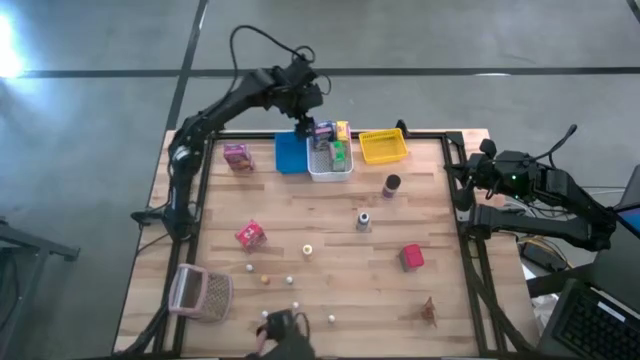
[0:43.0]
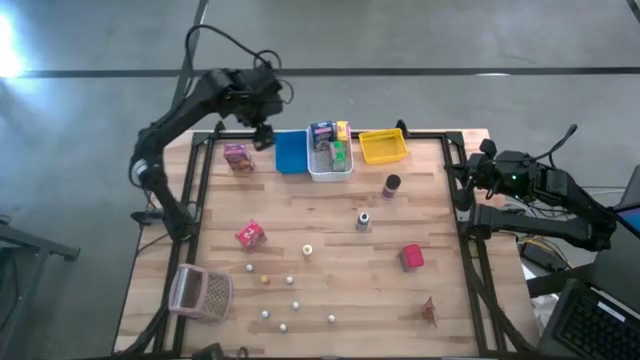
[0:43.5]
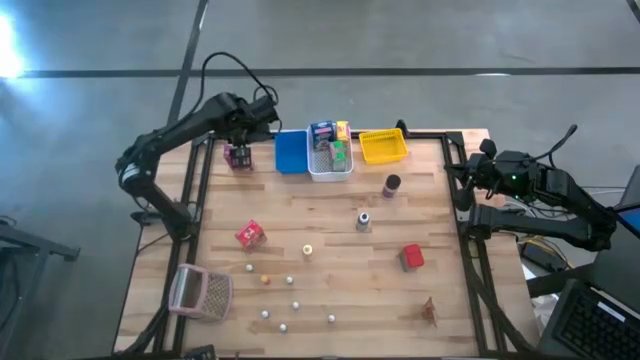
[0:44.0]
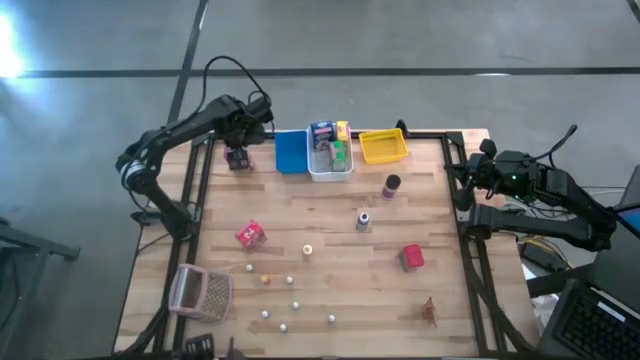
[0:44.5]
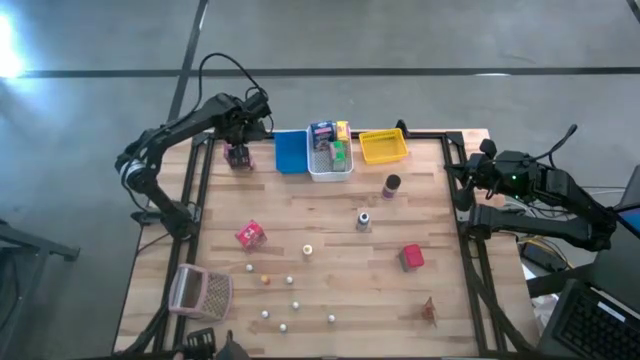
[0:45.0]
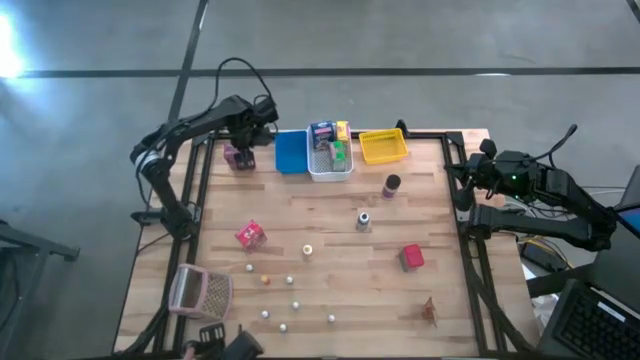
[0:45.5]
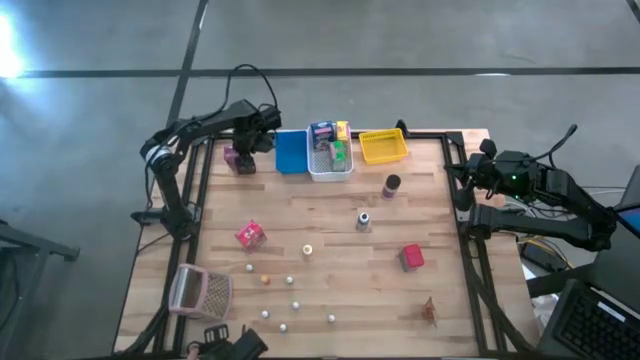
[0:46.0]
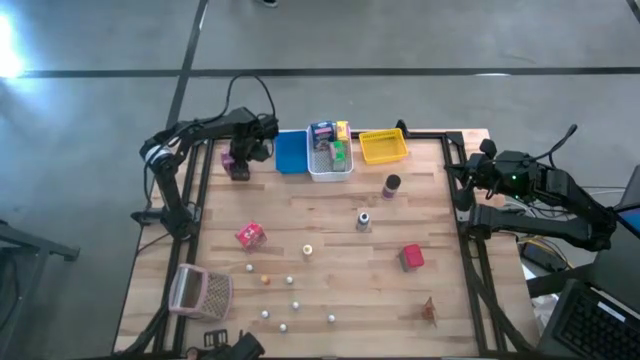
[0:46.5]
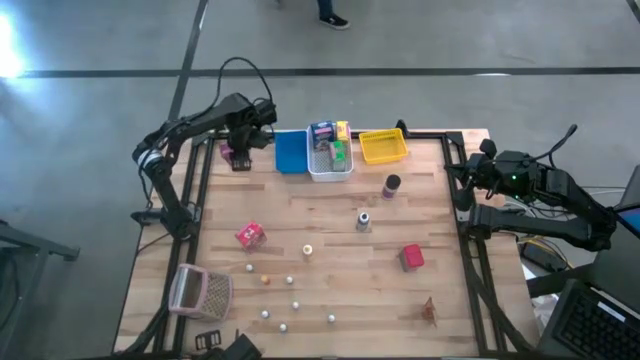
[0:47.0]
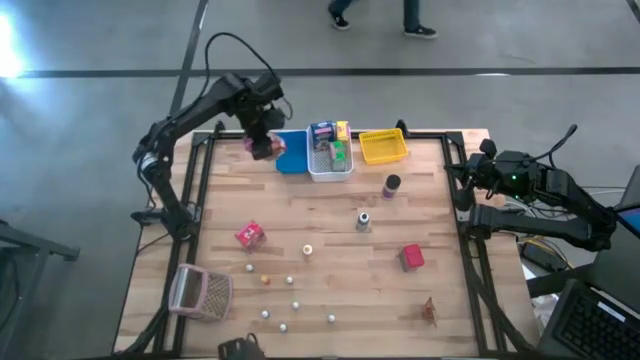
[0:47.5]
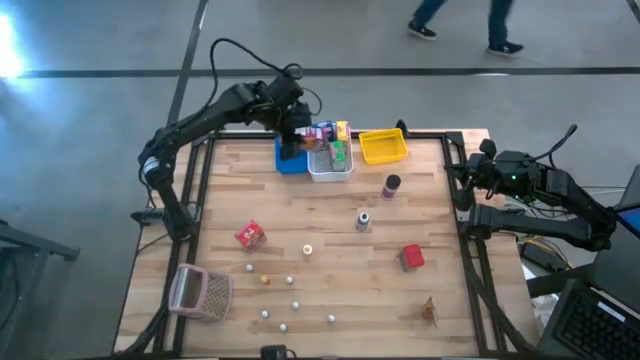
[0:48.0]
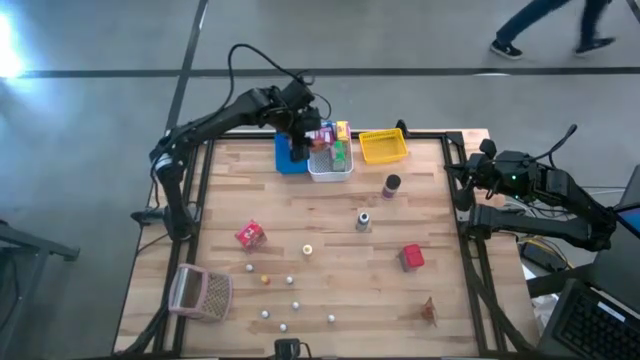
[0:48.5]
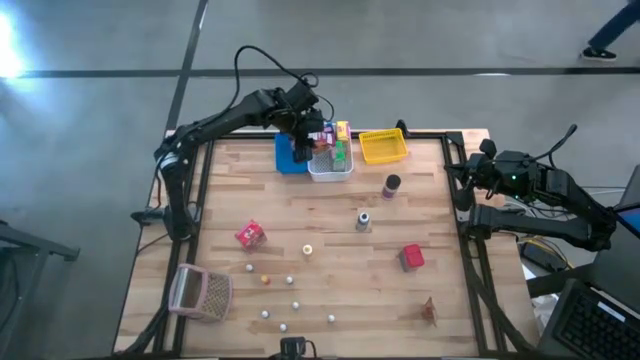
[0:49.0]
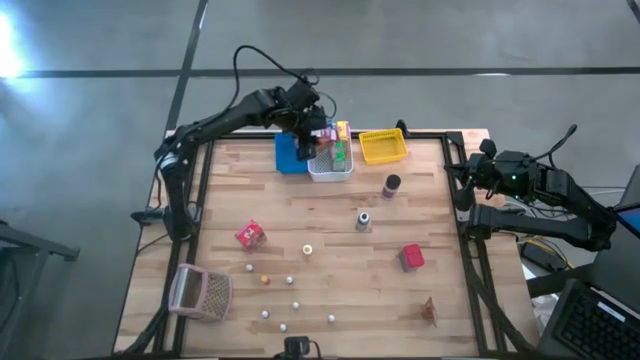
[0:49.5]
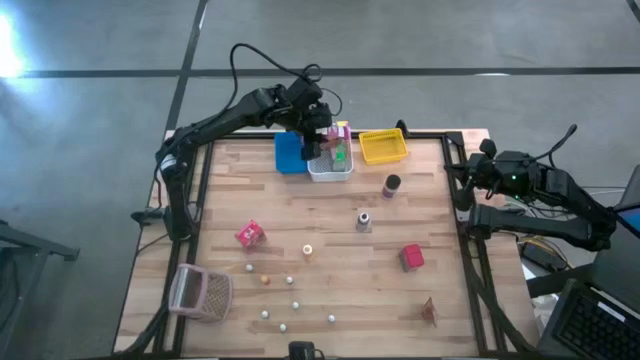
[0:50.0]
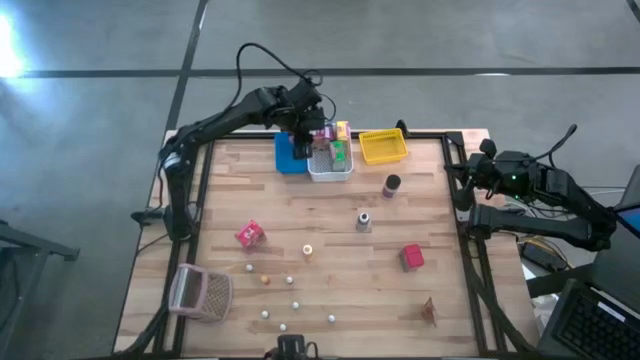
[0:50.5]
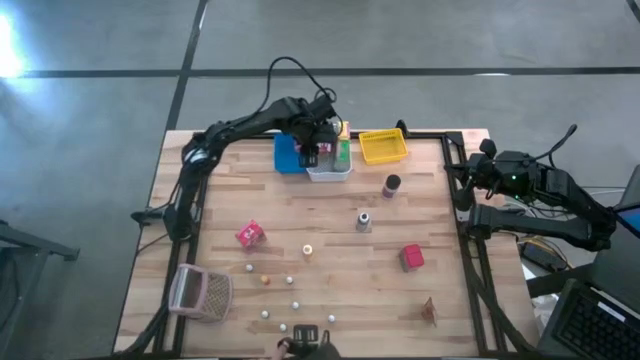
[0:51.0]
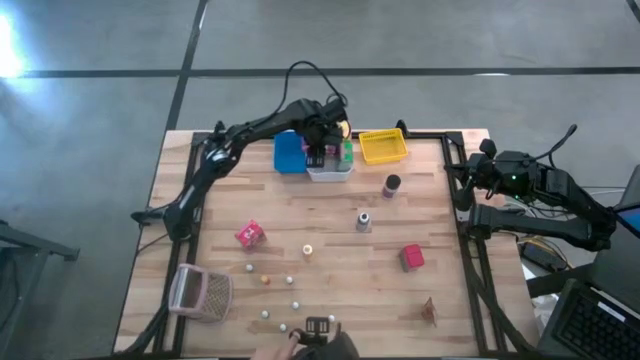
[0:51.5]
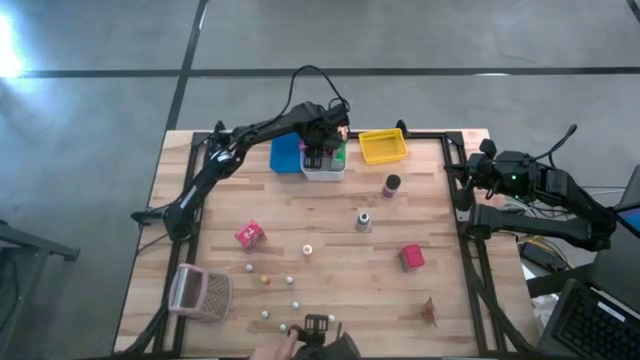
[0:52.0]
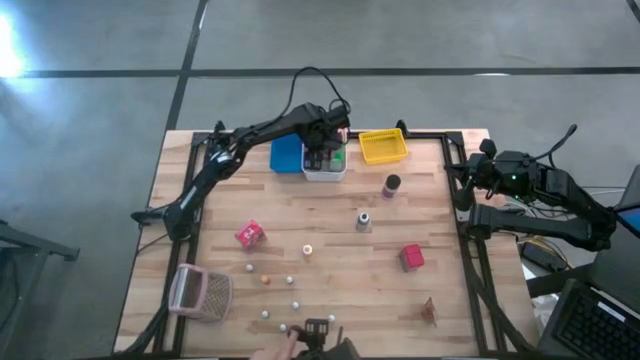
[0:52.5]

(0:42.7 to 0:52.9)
Task: Pick & Place Kitchen Items
Put the violet cereal box into the white bin

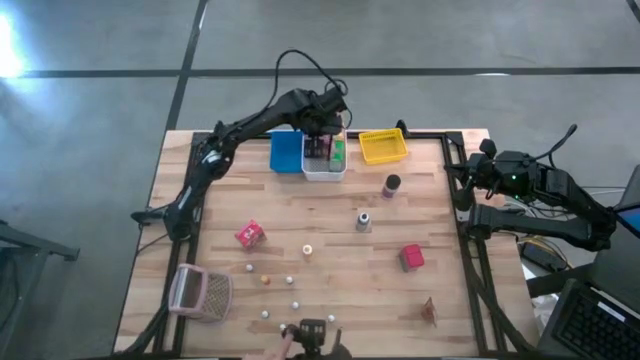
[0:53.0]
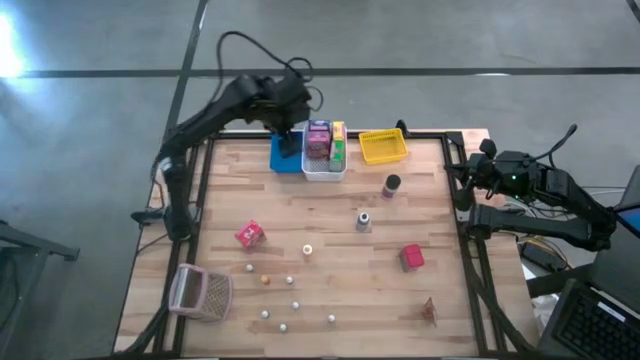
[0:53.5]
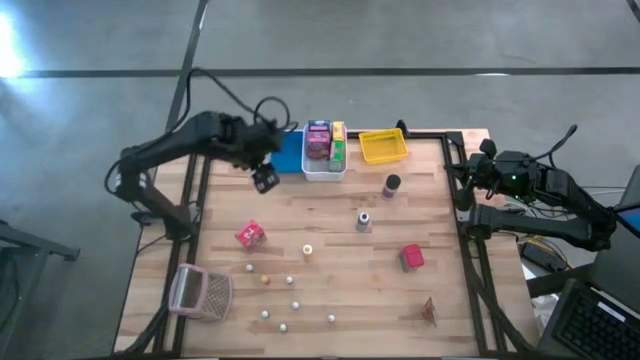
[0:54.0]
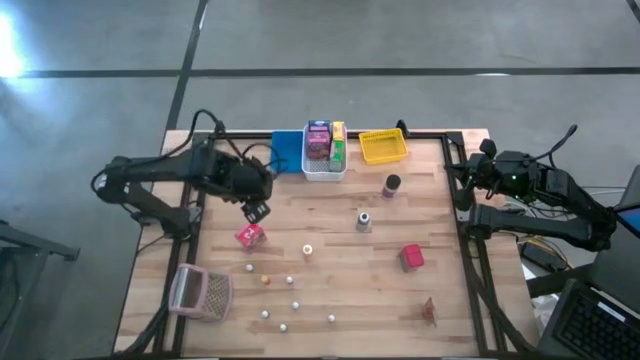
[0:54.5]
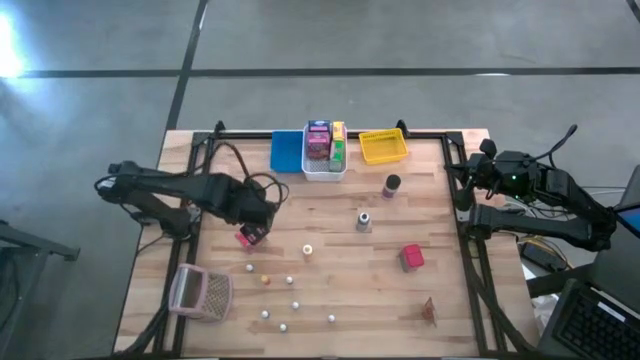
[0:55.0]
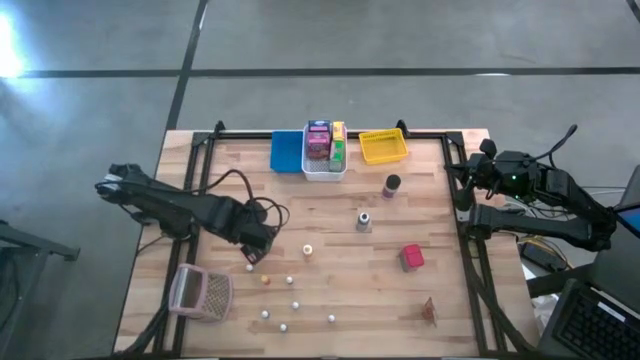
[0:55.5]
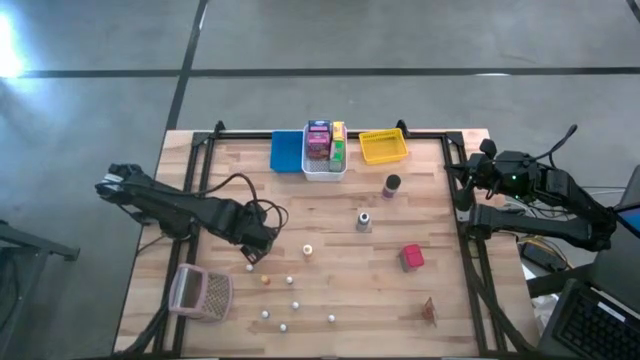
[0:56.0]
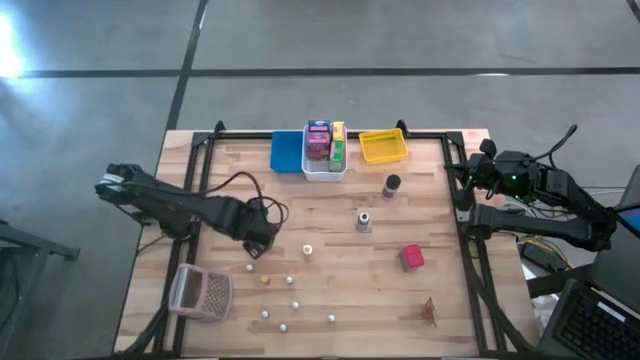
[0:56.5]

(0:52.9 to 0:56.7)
Put the red cereal box into the white bin

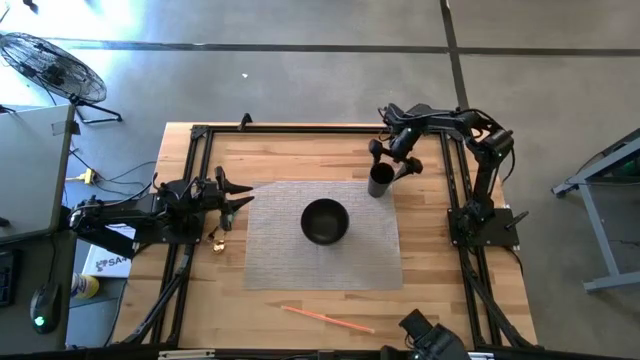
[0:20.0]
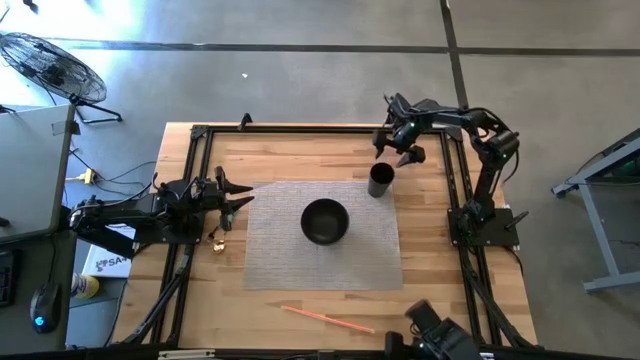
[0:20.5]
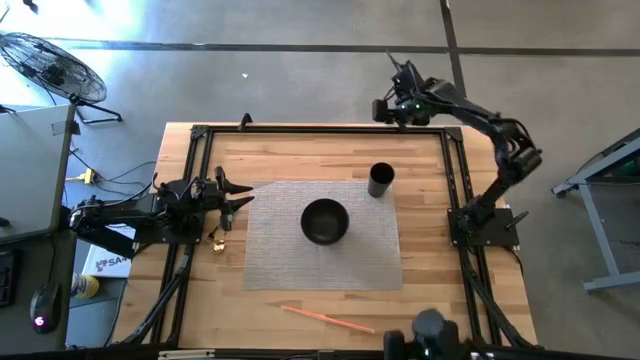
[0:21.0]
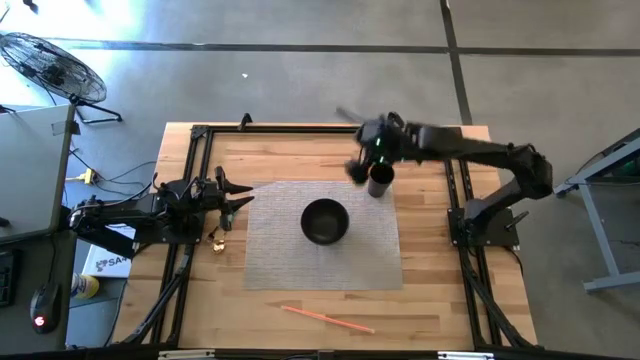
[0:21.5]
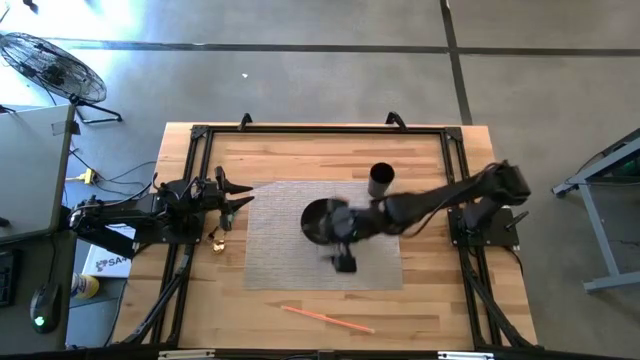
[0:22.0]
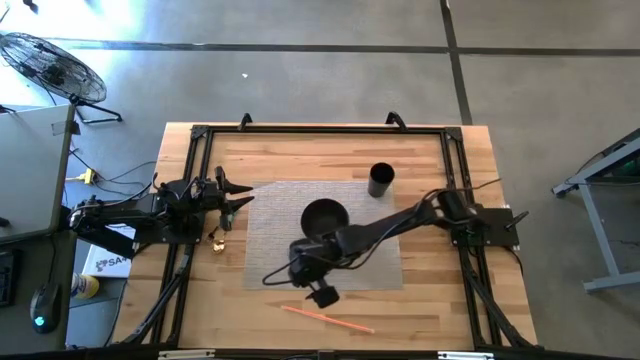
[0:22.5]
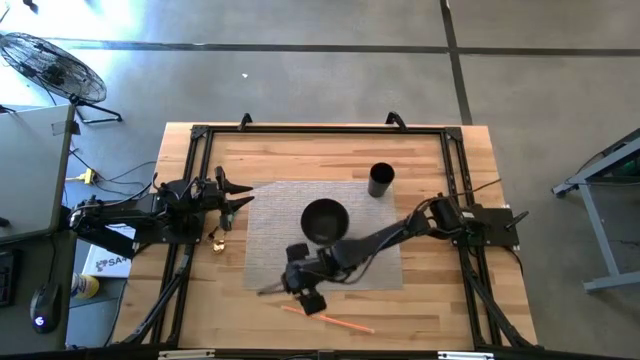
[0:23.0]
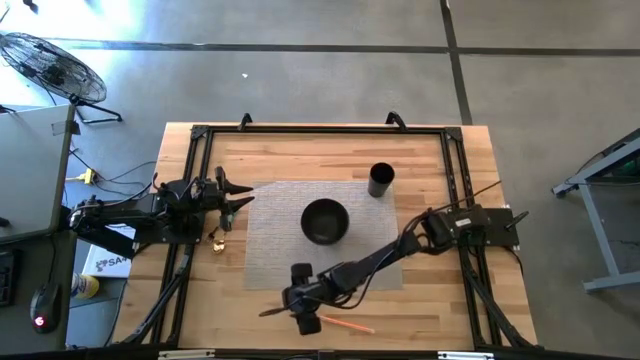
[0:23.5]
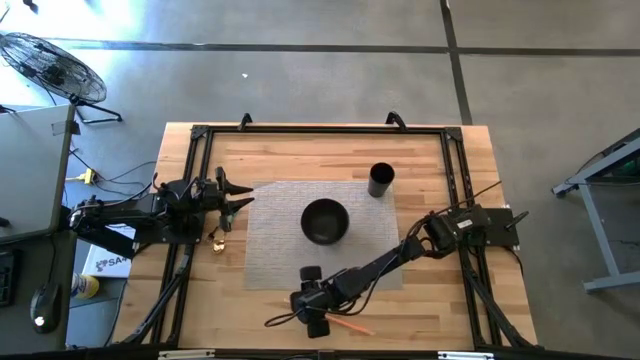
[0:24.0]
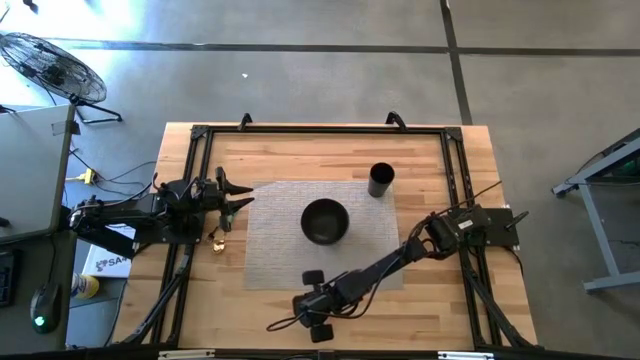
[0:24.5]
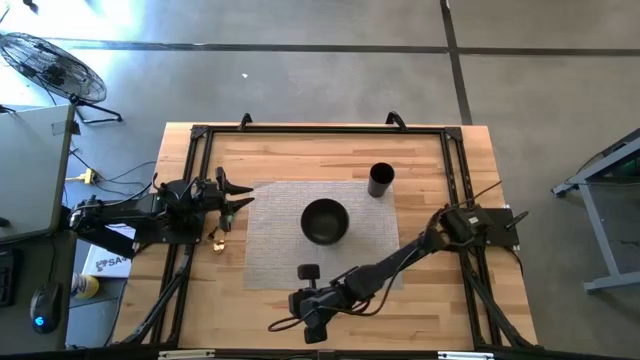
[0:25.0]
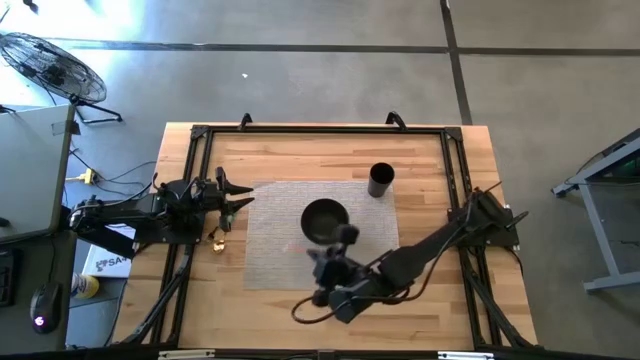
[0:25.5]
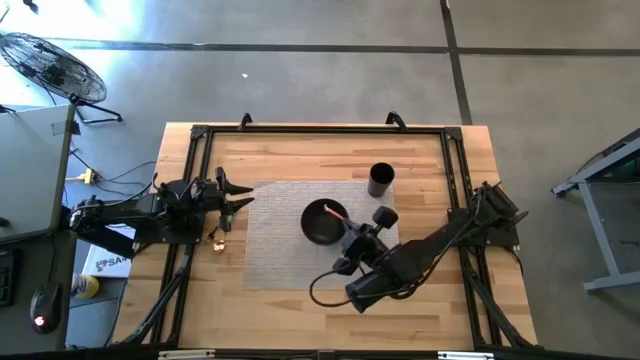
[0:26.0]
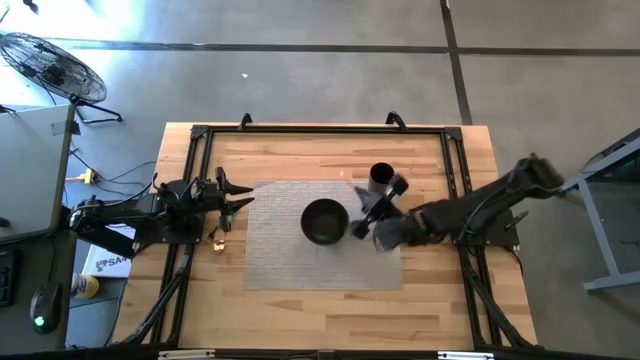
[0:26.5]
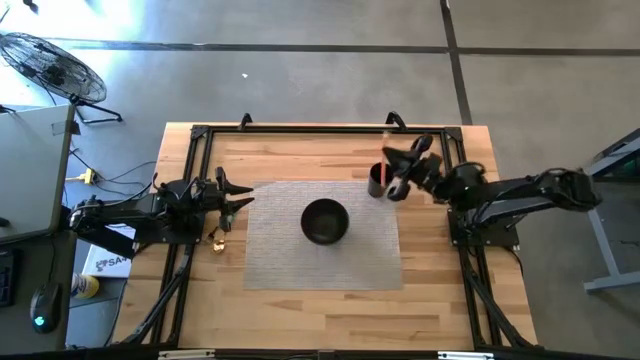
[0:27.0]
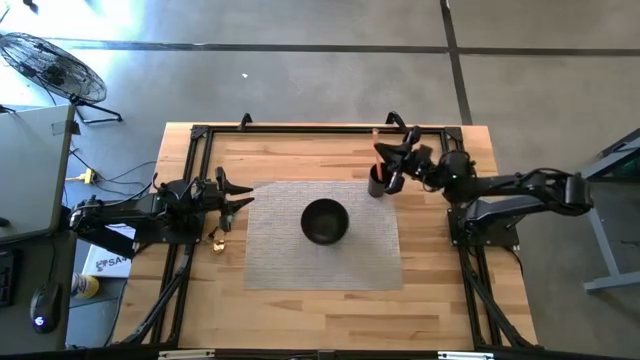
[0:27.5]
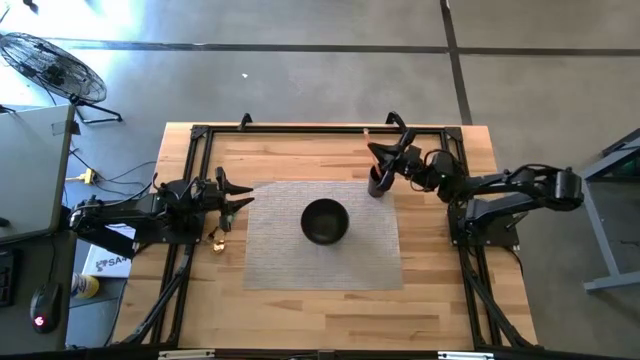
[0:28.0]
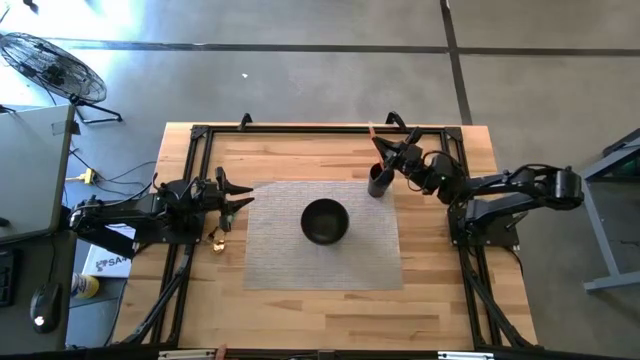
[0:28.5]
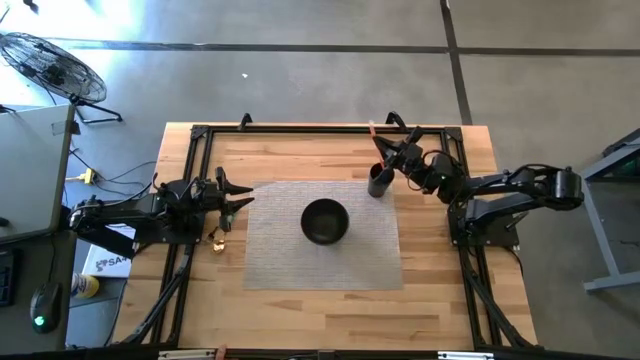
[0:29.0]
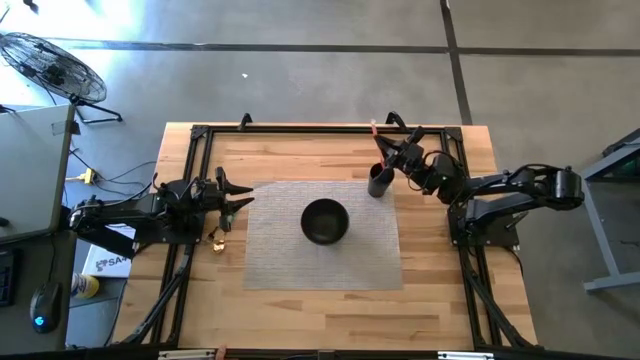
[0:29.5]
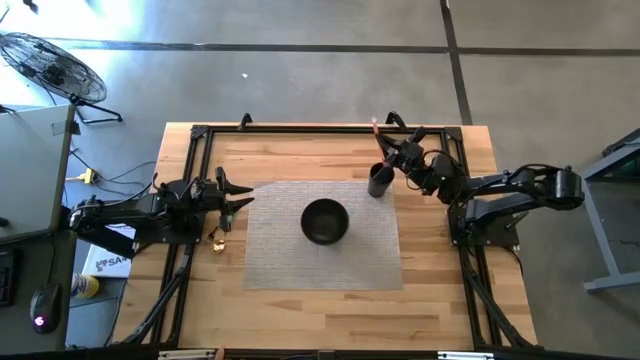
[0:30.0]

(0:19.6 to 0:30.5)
Task: Pick & Place Utensil
Put the orange straw into the black cup
